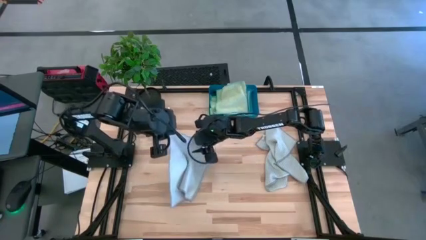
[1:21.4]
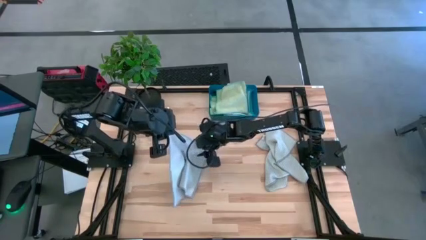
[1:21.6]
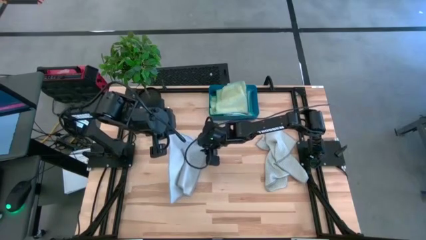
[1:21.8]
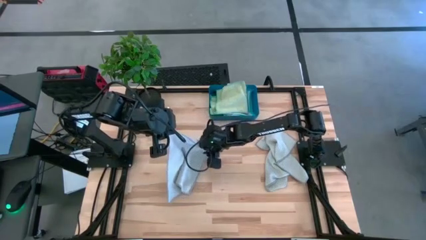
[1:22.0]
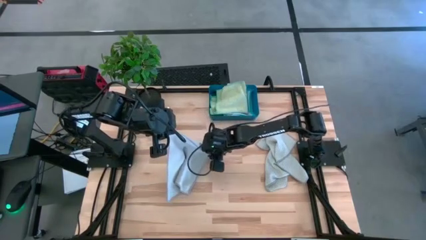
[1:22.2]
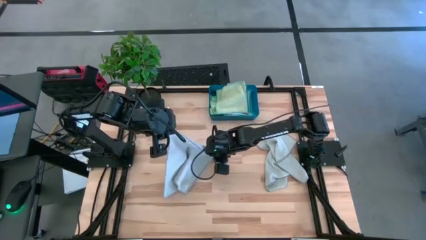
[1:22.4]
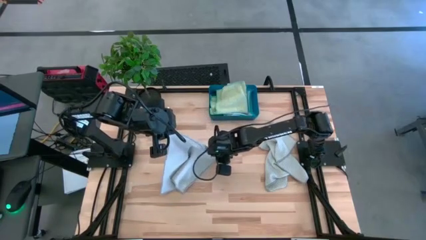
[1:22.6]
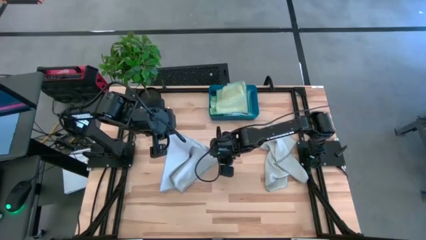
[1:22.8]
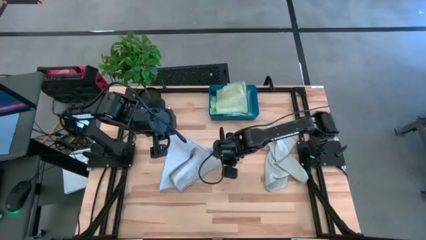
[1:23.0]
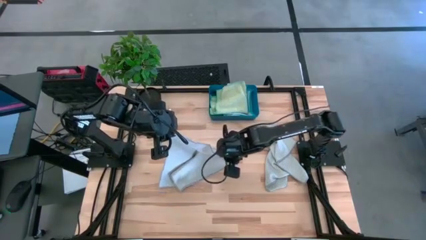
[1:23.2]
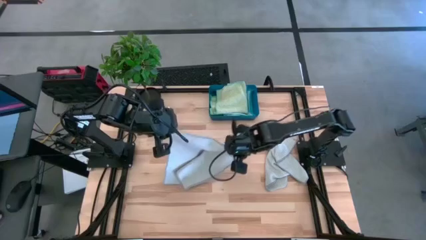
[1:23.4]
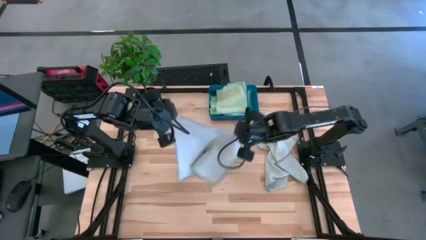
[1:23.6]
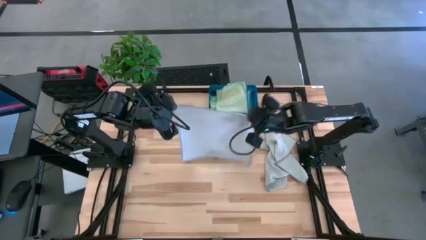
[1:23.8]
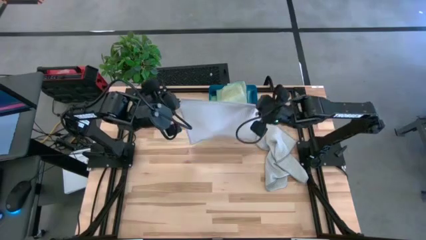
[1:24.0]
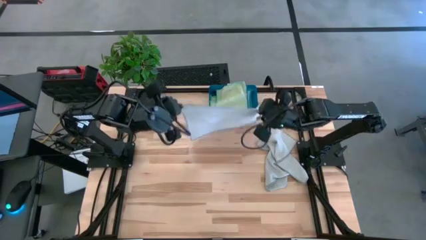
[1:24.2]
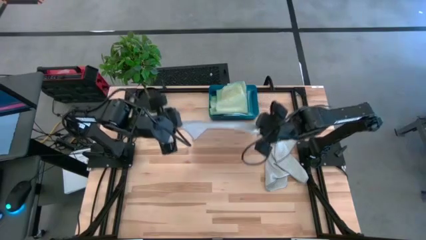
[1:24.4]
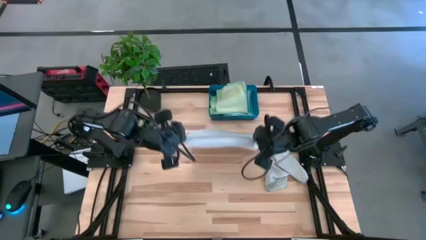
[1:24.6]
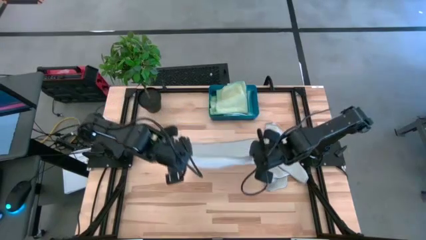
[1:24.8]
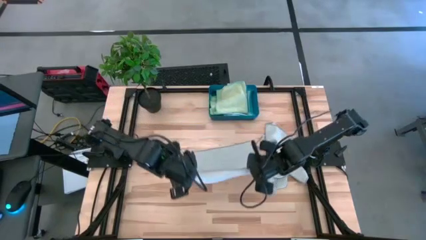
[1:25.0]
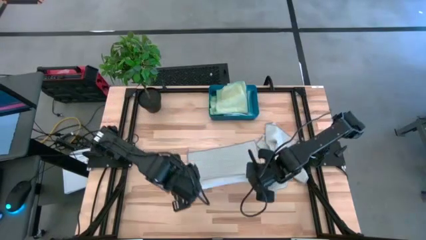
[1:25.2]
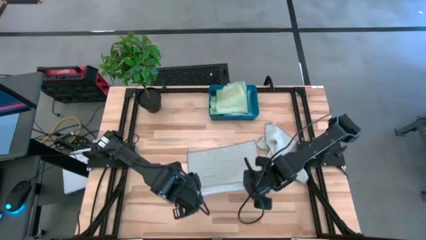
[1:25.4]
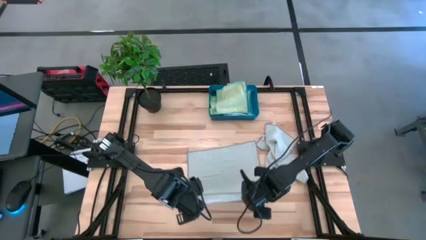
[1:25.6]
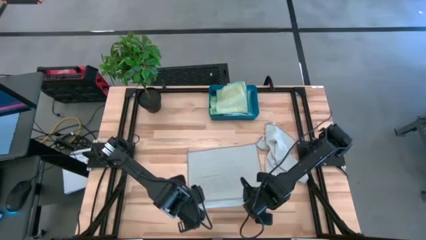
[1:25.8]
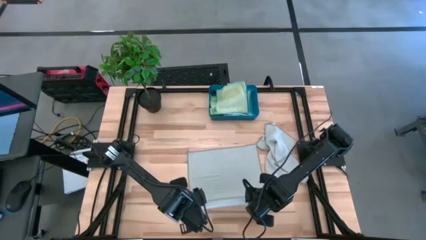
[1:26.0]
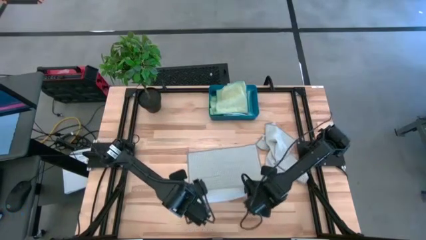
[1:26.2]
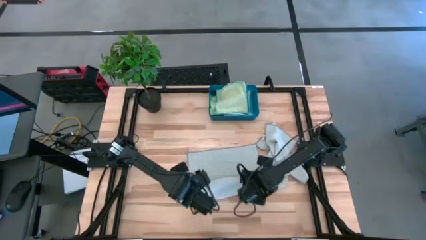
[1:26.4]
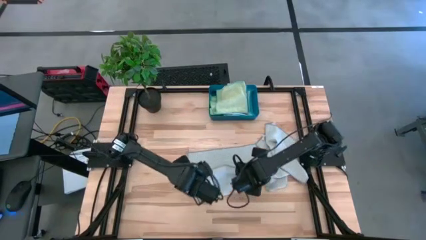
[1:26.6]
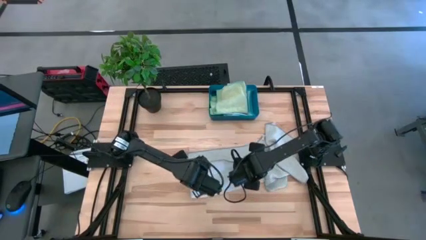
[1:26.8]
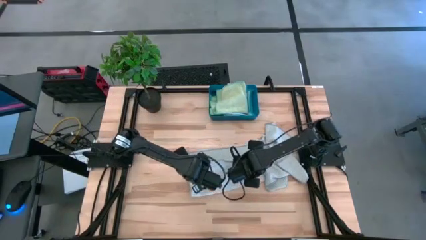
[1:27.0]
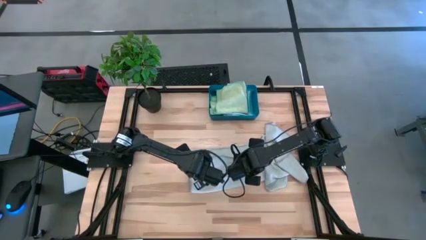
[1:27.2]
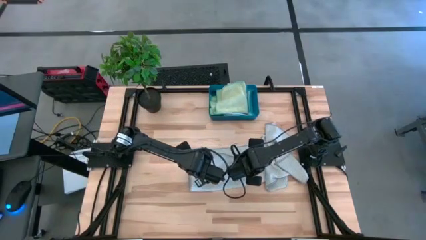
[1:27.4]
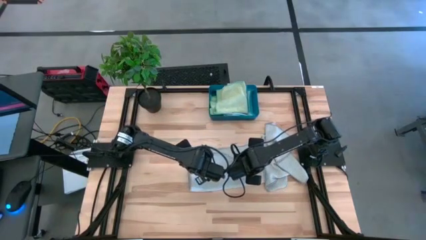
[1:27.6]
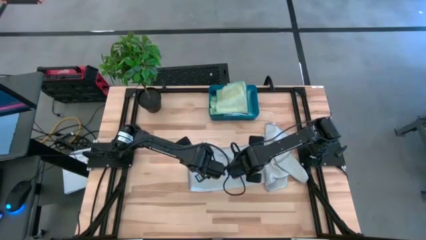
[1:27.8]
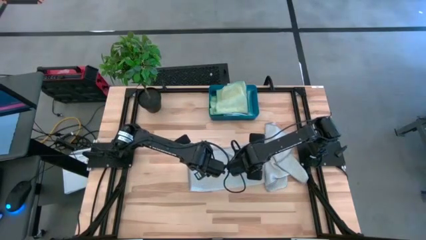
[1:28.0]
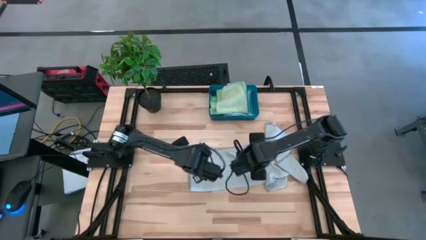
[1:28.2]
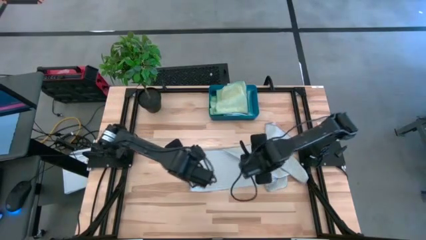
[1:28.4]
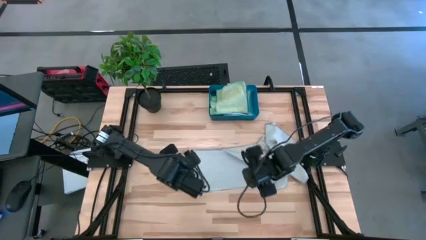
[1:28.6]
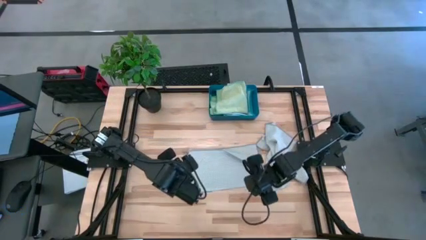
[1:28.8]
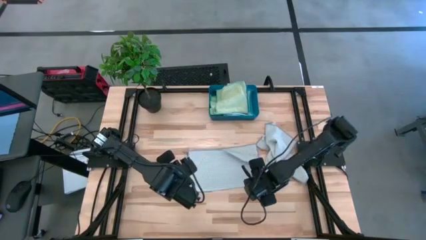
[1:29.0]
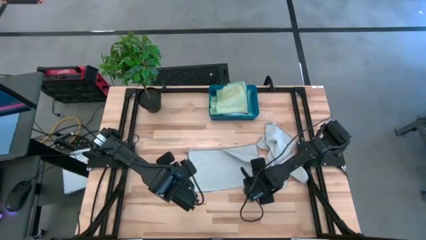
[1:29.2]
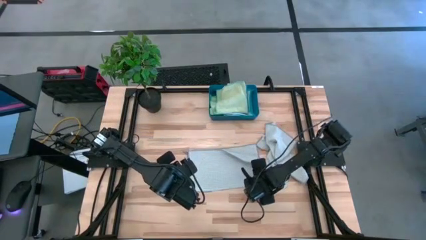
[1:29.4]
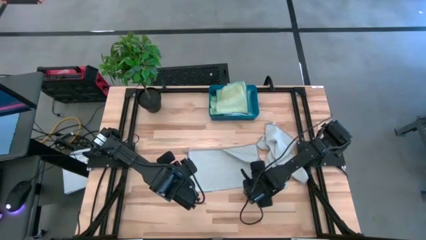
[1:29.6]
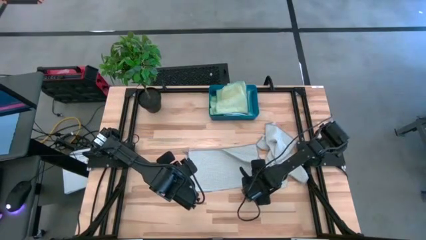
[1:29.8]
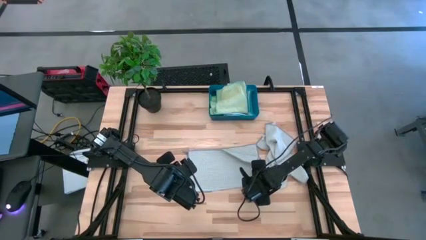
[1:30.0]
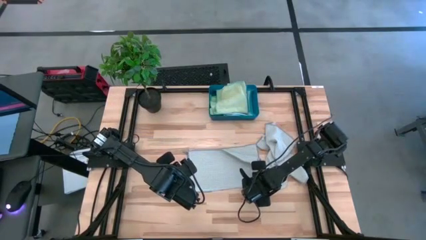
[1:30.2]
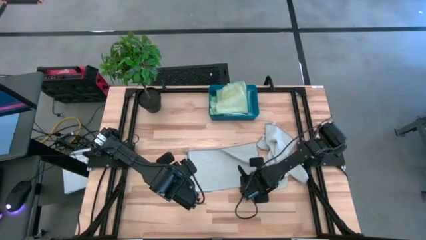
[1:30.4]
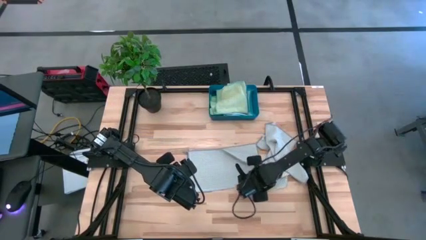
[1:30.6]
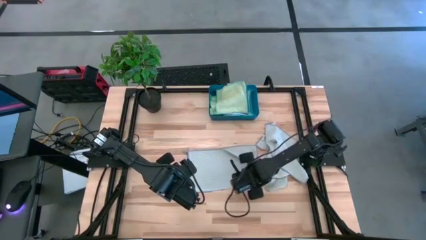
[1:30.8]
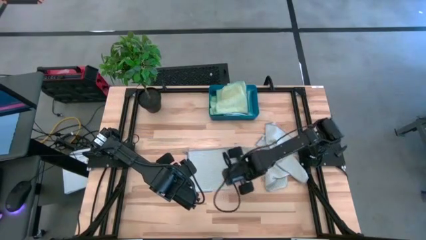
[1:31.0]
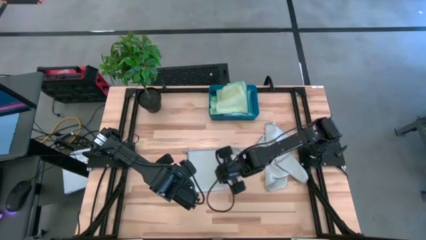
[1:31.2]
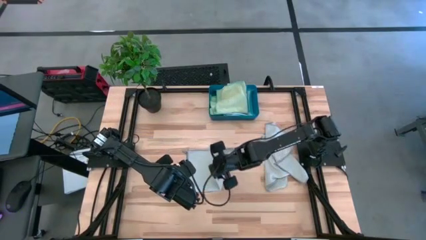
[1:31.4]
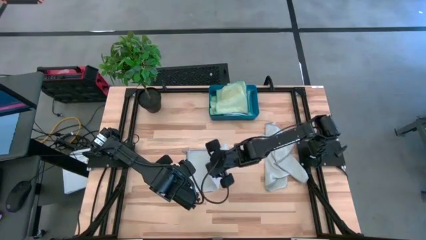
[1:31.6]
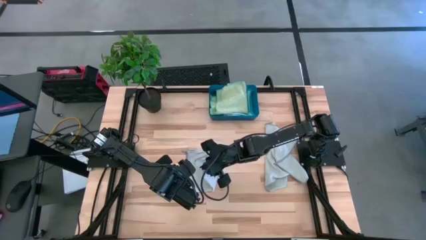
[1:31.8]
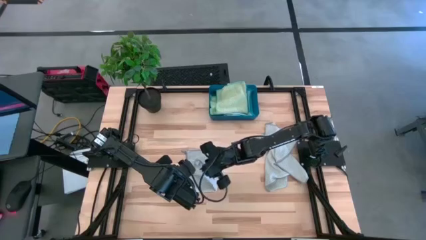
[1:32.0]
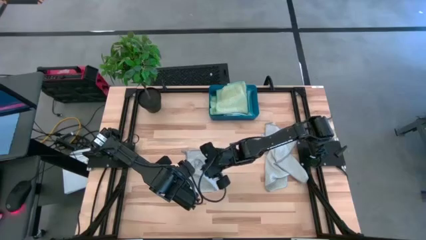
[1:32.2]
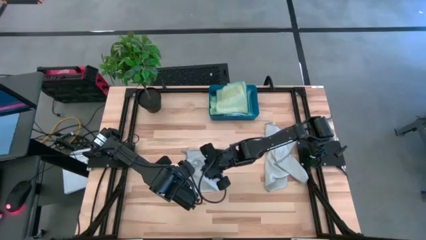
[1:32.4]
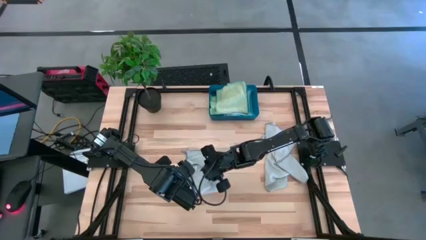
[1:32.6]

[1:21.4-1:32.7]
Task: Fold microfiber towels
Fold the left gray towel

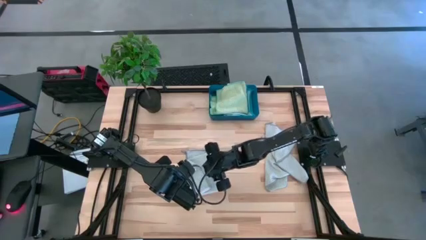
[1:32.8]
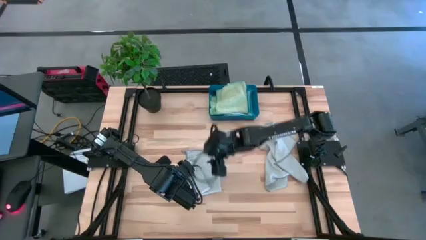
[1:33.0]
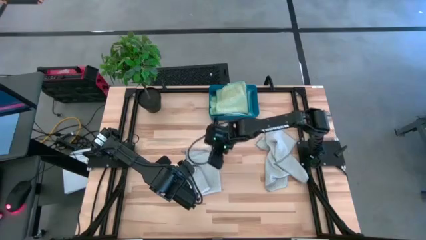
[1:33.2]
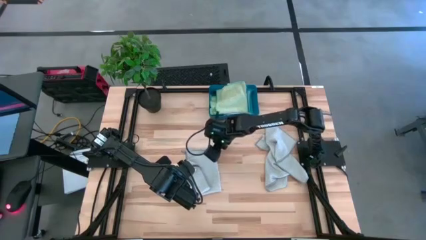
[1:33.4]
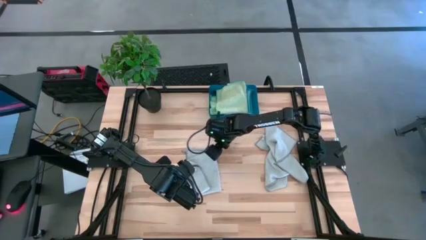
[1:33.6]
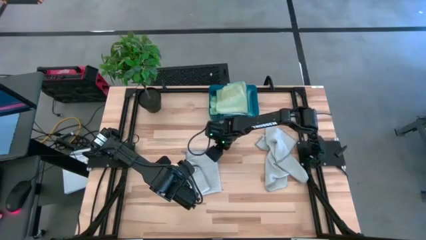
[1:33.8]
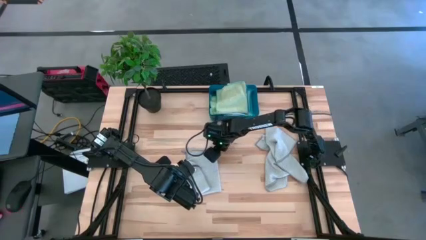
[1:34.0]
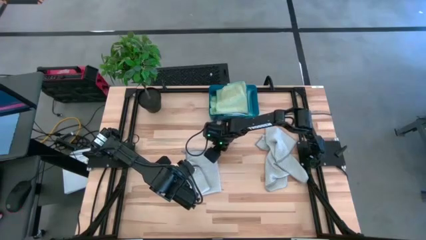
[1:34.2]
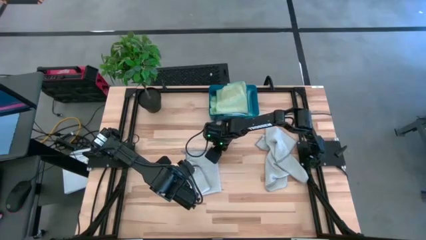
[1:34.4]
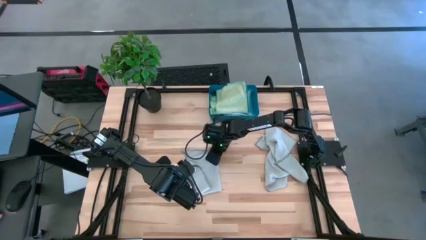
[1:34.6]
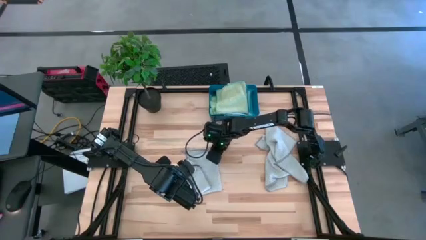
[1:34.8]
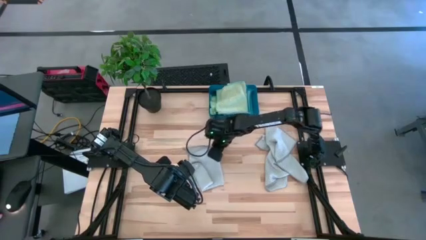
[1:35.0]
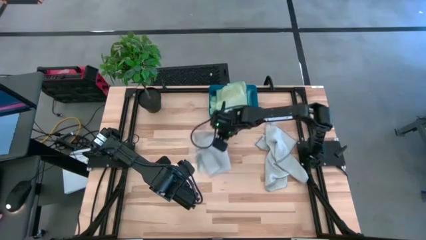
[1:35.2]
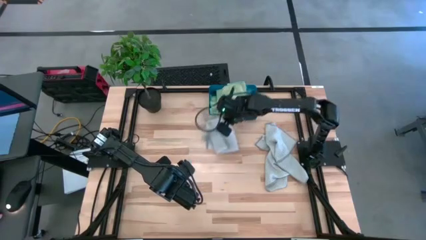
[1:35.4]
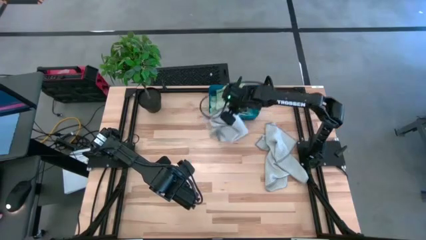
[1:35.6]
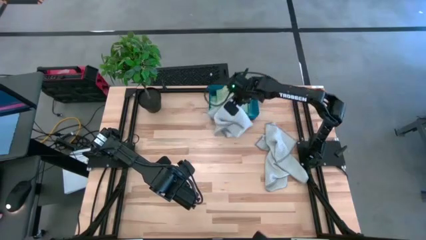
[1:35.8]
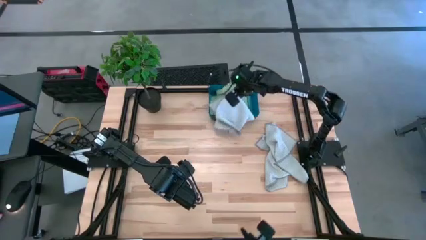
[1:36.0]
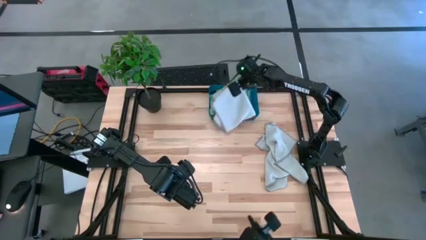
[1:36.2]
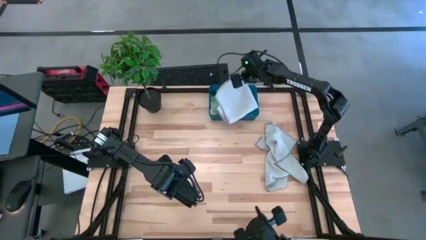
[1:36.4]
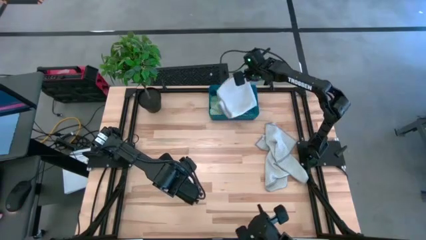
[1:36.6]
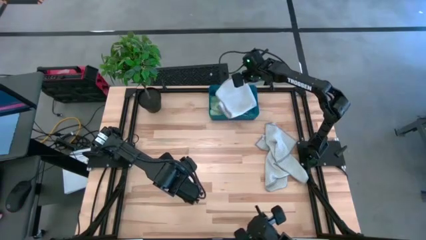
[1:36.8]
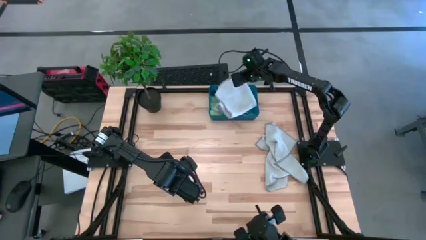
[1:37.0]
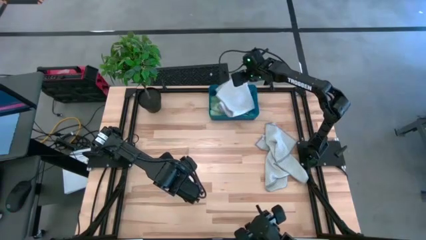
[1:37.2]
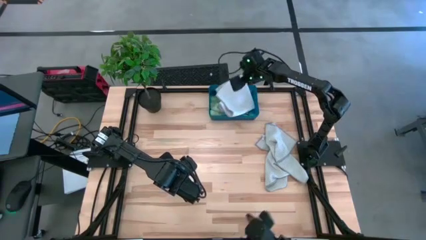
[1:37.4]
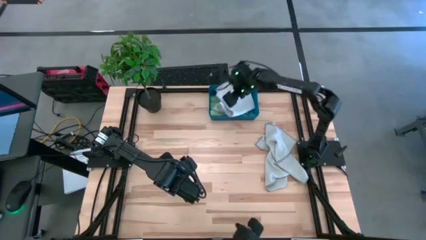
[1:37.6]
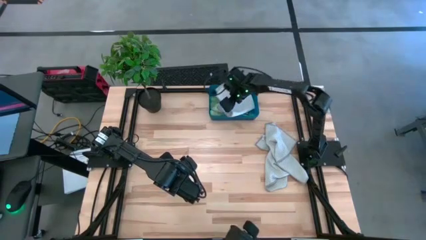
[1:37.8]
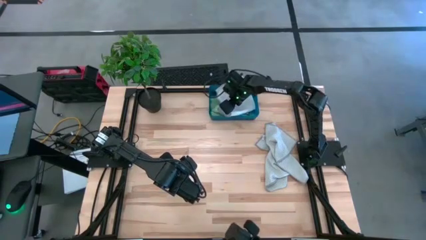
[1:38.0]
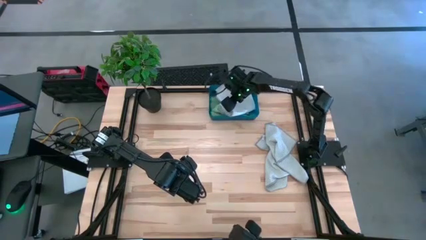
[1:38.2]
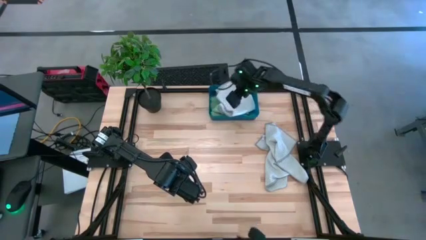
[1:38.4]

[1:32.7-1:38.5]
Put the left gray towel into the blue bin
